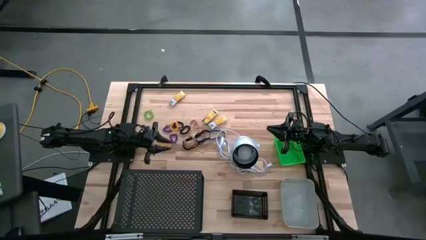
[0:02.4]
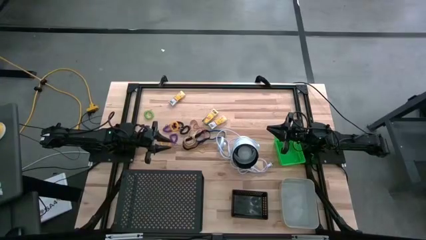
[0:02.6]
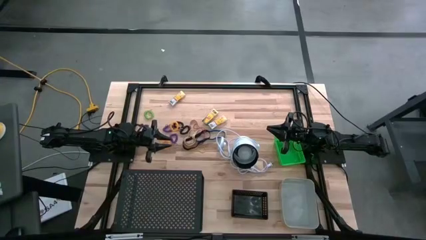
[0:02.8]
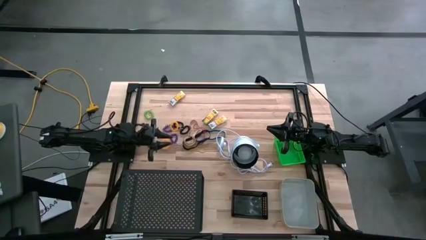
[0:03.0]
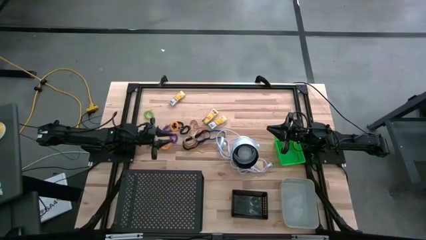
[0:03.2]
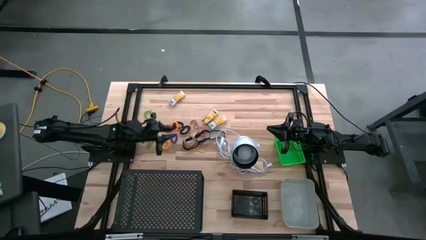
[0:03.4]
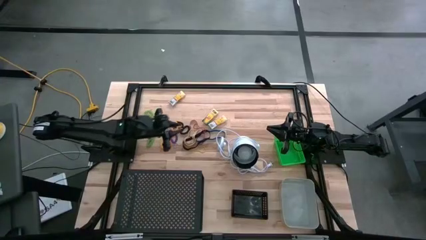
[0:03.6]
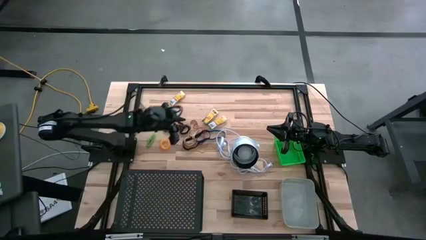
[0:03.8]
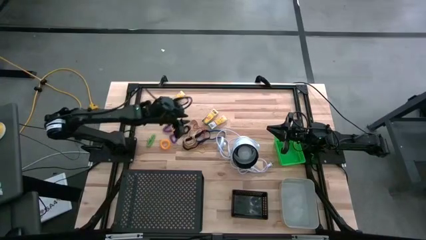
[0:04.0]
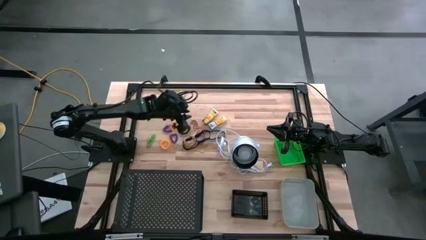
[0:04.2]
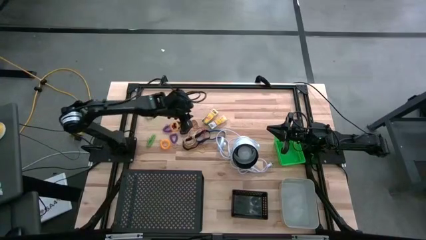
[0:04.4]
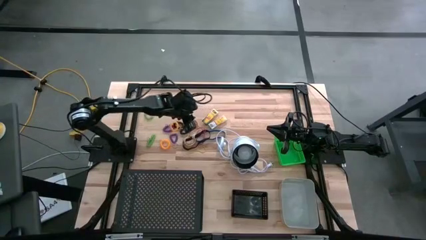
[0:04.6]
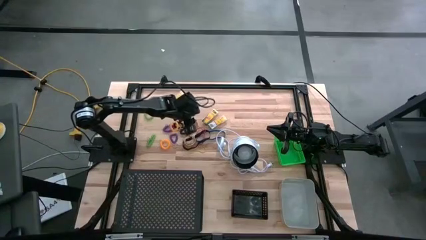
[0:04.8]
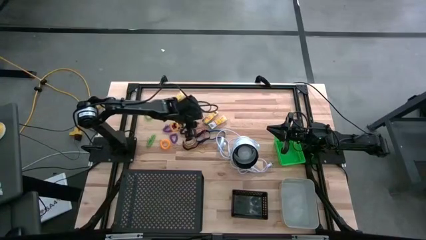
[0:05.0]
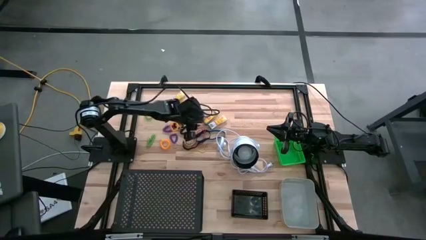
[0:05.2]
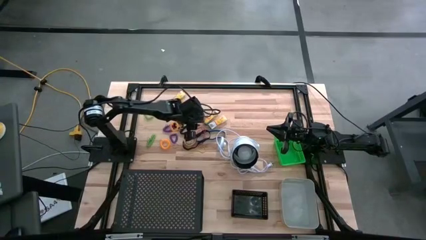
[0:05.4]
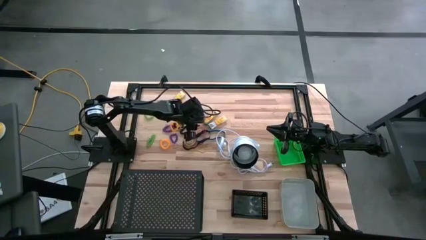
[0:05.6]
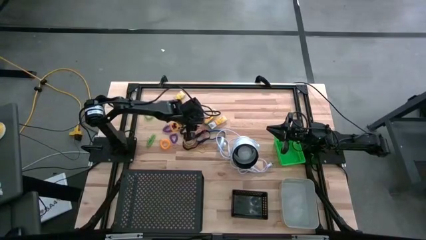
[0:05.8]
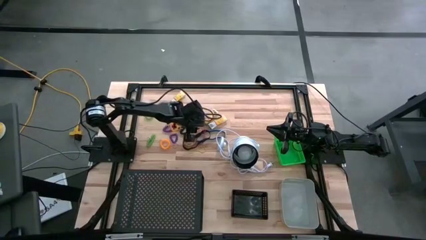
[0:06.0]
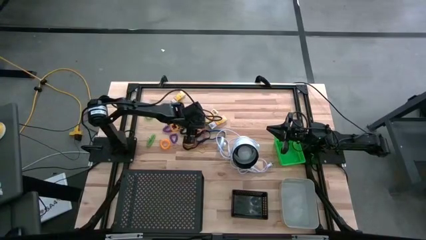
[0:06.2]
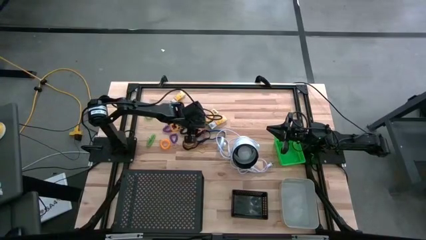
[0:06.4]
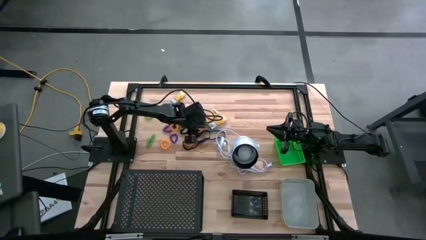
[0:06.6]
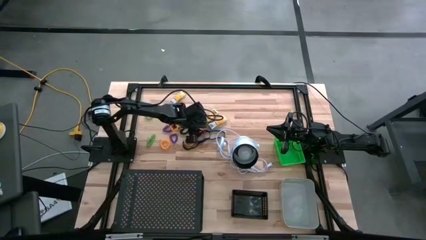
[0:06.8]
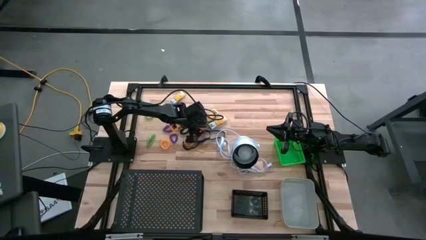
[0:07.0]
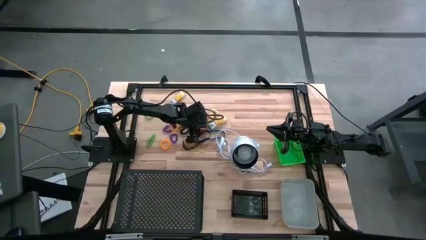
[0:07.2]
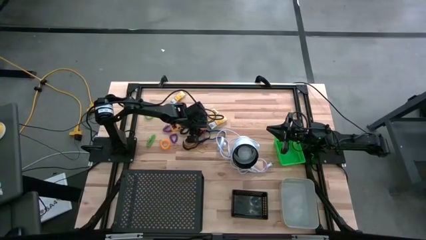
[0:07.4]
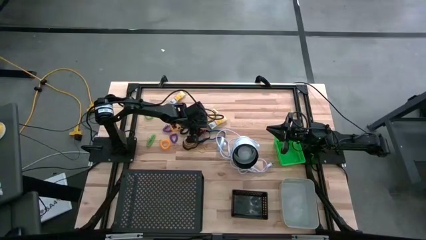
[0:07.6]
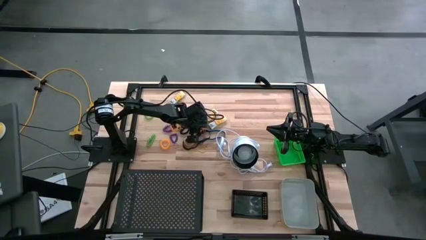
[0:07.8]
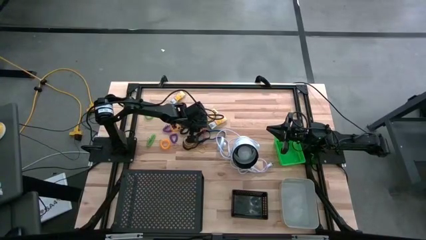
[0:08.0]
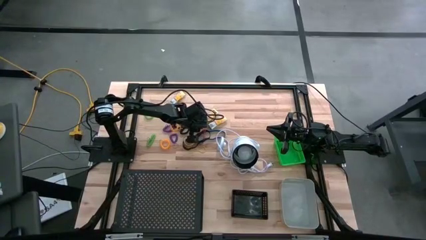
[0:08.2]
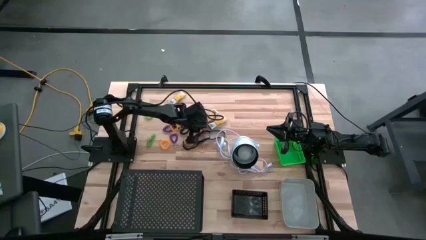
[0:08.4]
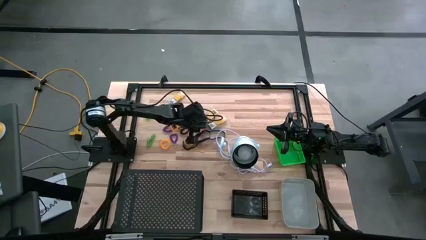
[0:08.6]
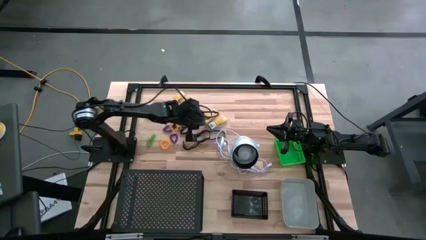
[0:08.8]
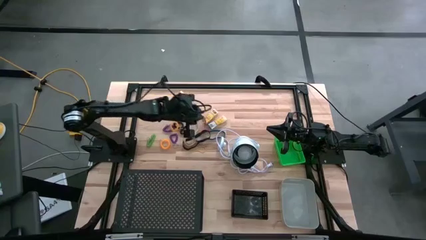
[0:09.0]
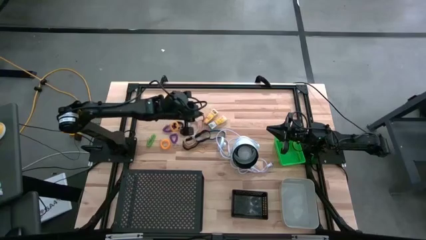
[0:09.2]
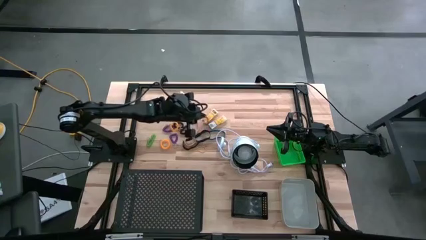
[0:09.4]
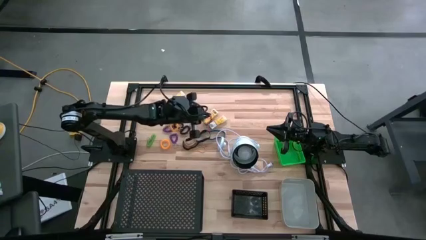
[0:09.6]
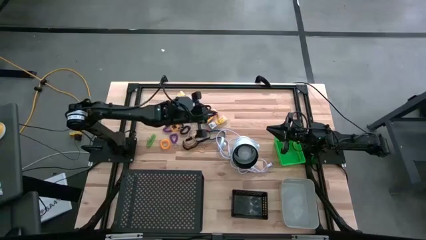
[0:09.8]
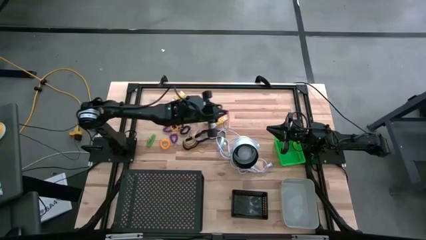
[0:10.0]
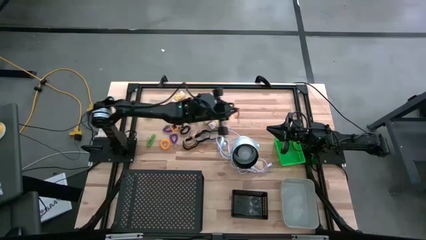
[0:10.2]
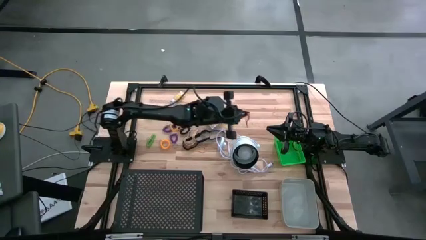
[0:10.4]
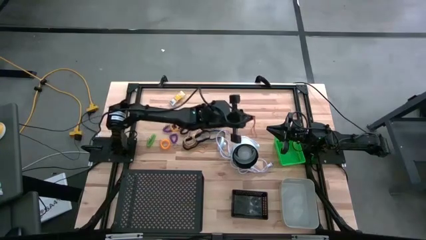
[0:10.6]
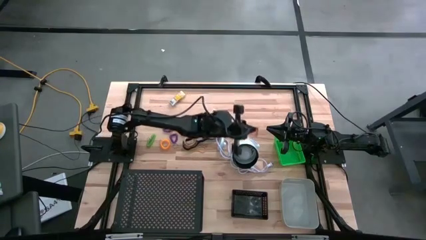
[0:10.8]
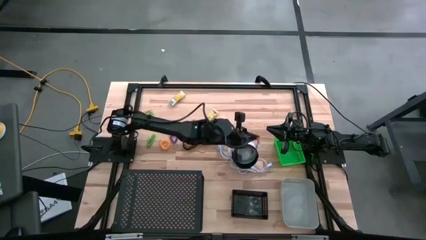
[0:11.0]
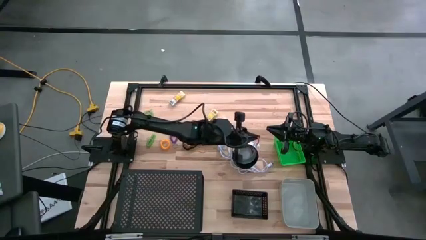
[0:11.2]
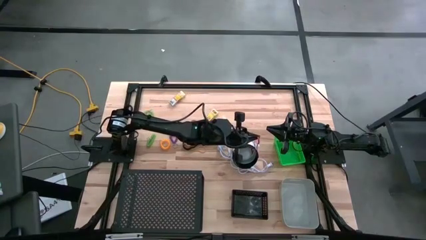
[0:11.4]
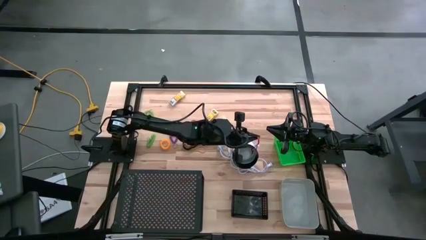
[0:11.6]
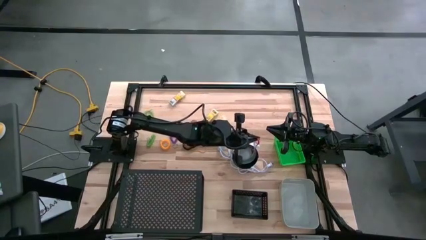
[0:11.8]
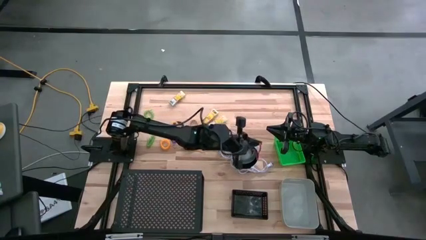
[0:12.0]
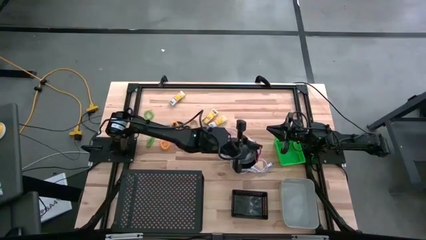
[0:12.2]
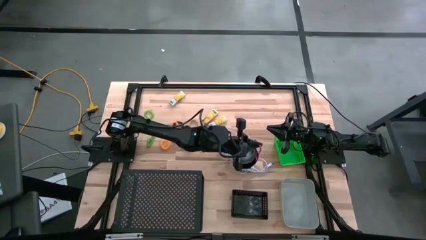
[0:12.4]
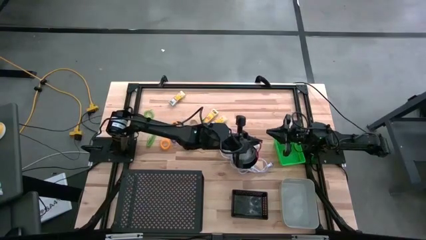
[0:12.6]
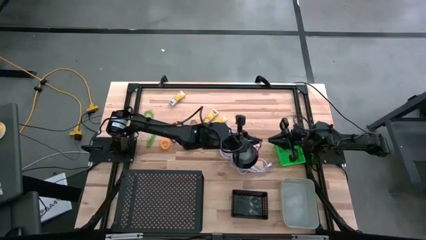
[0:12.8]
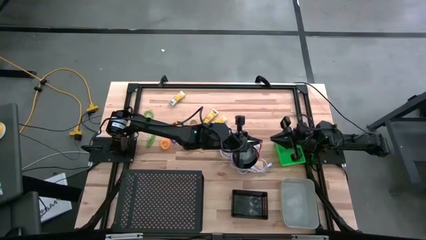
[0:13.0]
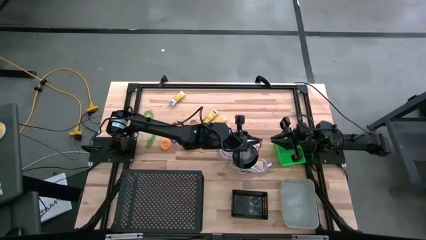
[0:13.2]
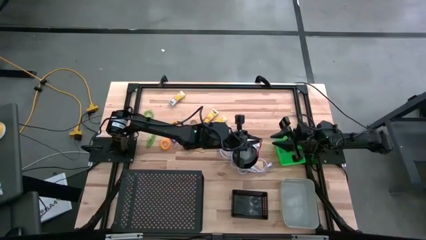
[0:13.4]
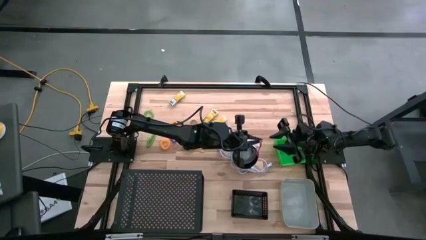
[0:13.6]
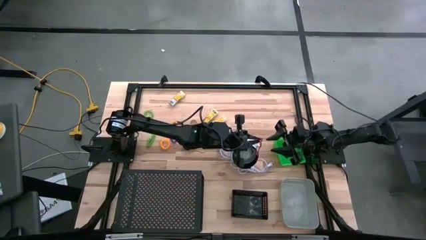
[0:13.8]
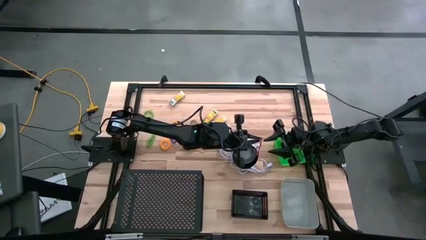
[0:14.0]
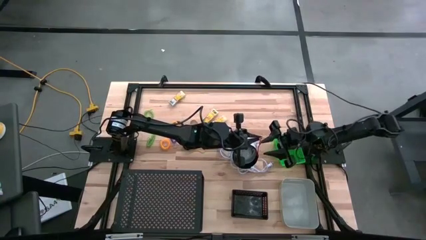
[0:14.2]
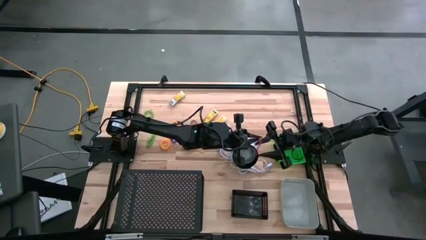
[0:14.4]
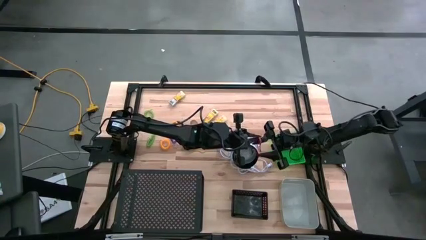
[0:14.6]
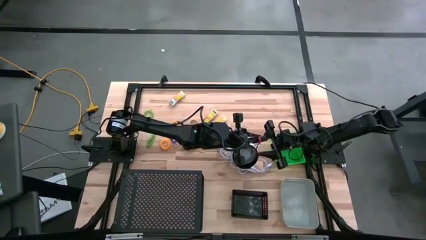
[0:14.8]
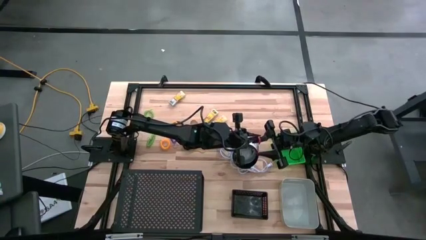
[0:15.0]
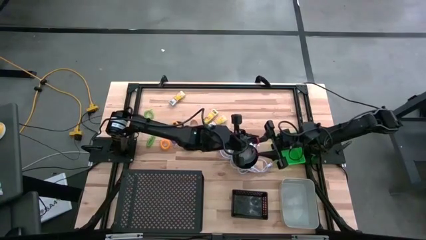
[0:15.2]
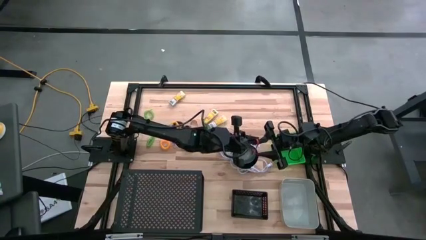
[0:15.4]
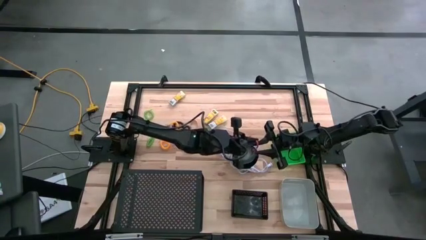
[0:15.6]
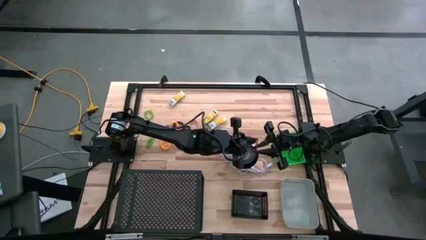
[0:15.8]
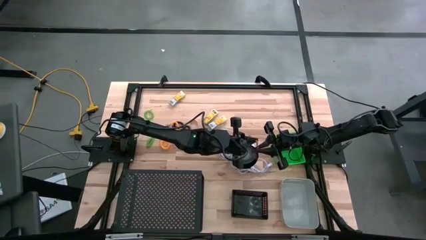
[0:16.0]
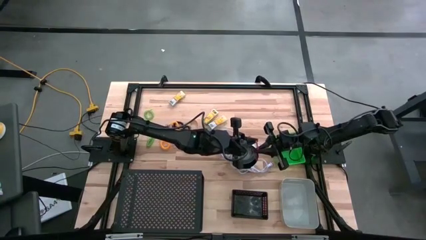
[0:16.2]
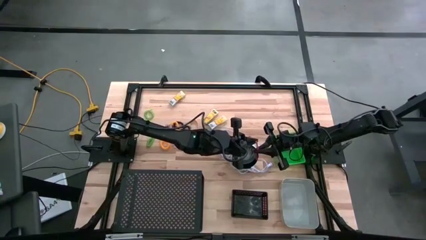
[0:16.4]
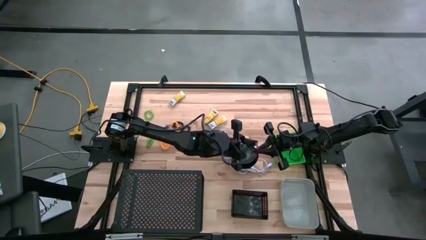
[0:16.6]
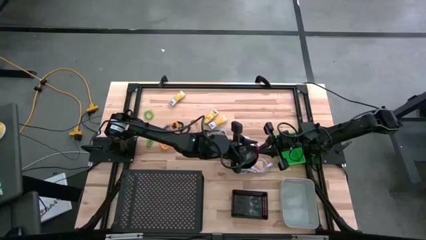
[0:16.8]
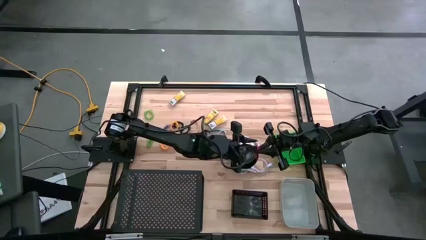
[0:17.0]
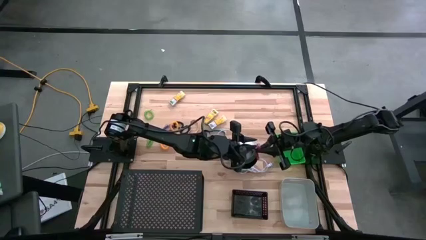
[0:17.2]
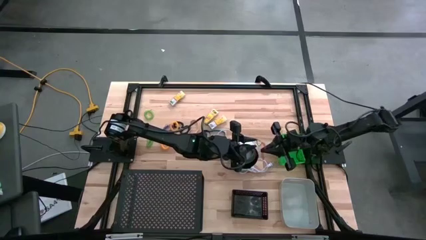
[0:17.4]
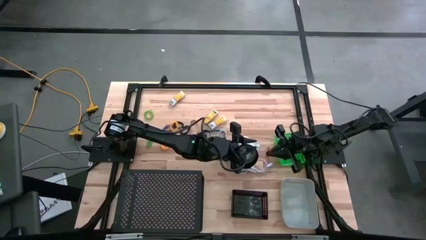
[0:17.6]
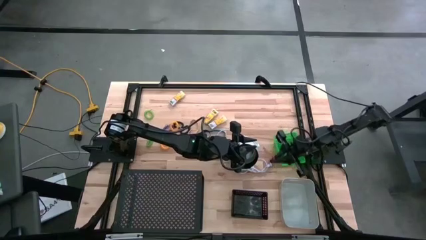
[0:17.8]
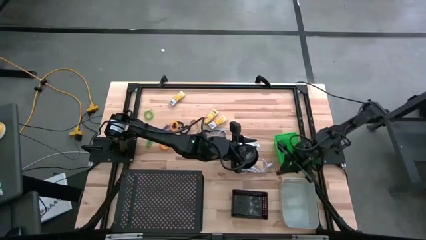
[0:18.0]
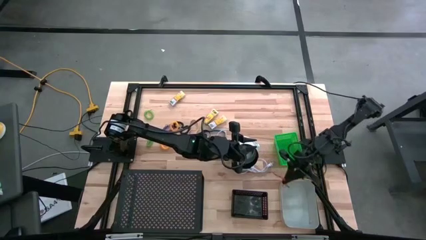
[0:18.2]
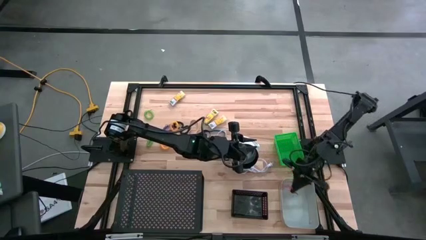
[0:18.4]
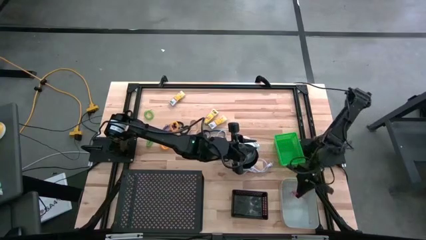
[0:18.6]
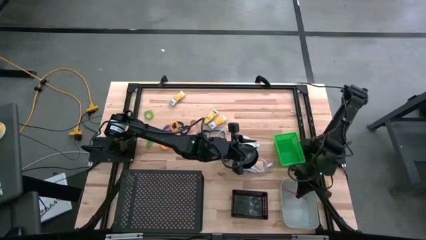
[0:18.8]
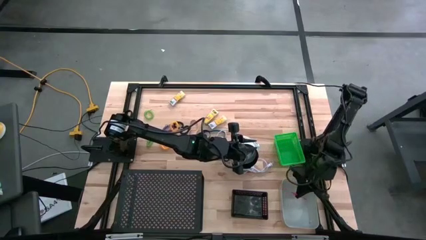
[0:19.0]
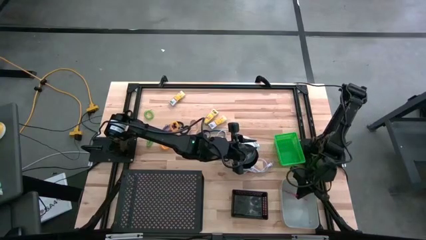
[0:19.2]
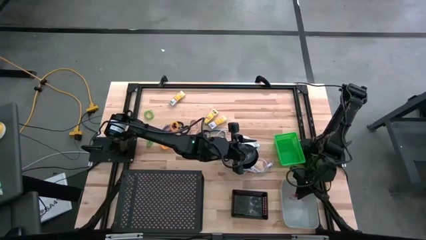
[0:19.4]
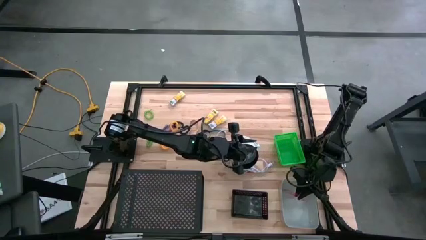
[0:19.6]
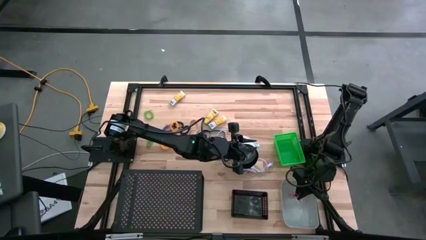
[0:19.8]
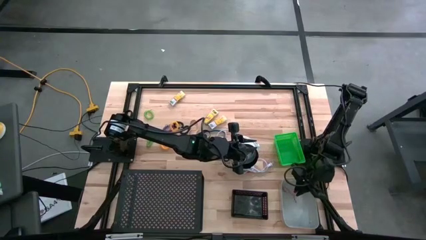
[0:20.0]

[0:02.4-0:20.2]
Task: Pick & Place Office Desk Supplies
Put the red rubberband into the gray bin
